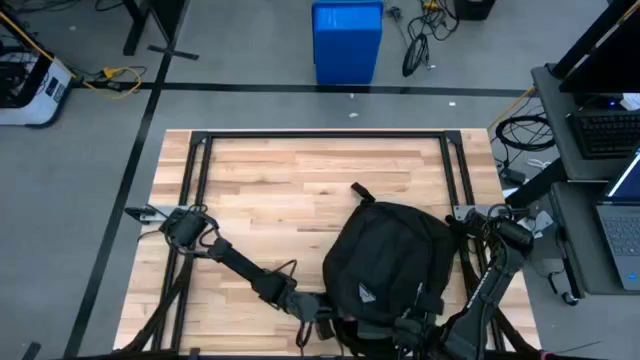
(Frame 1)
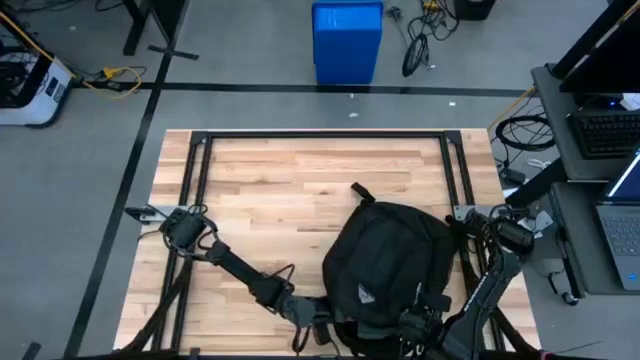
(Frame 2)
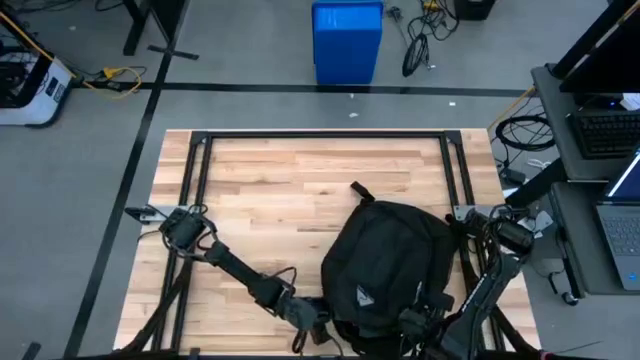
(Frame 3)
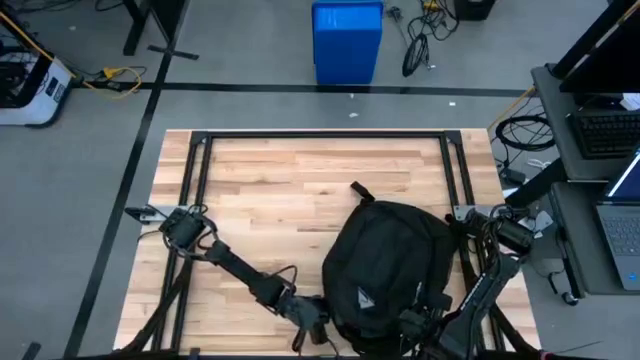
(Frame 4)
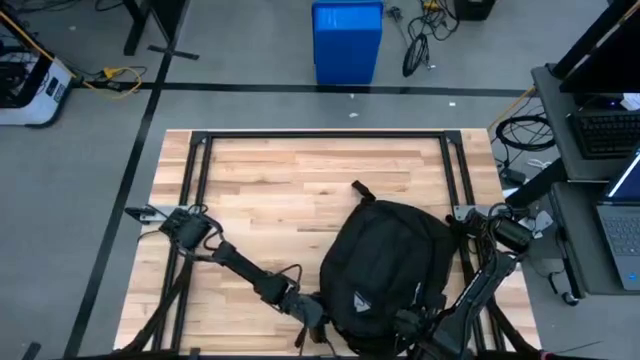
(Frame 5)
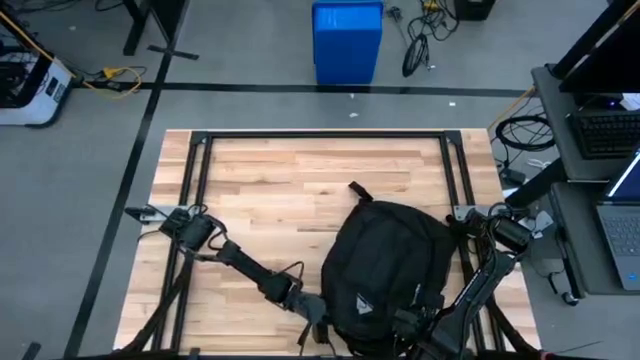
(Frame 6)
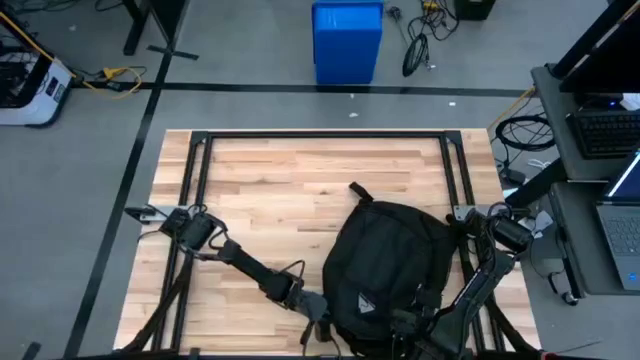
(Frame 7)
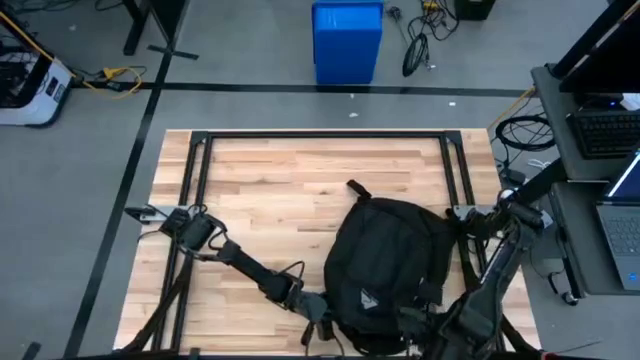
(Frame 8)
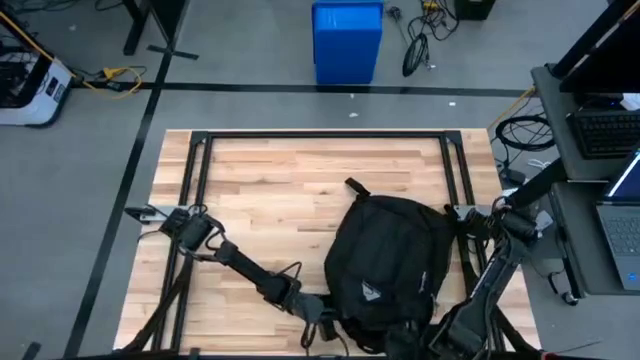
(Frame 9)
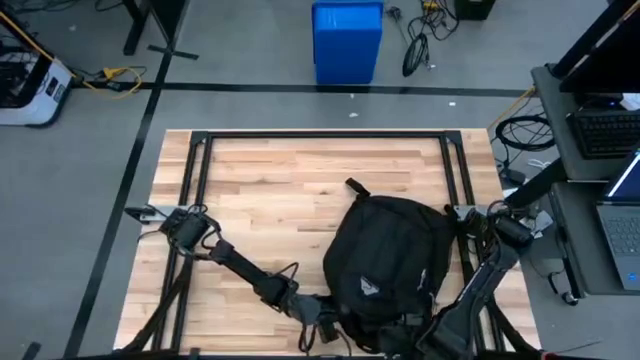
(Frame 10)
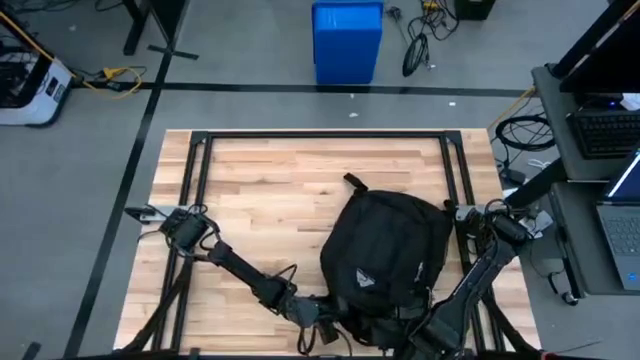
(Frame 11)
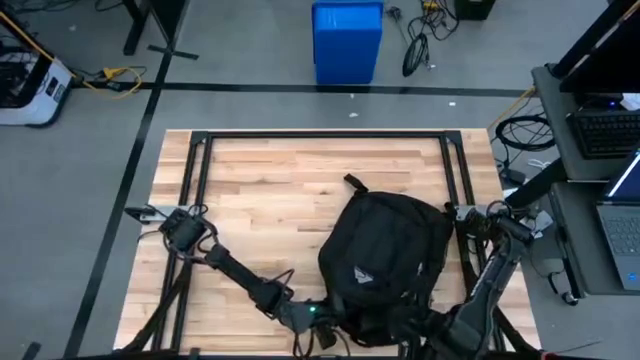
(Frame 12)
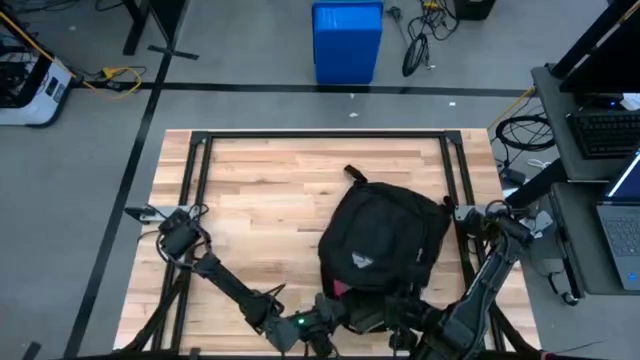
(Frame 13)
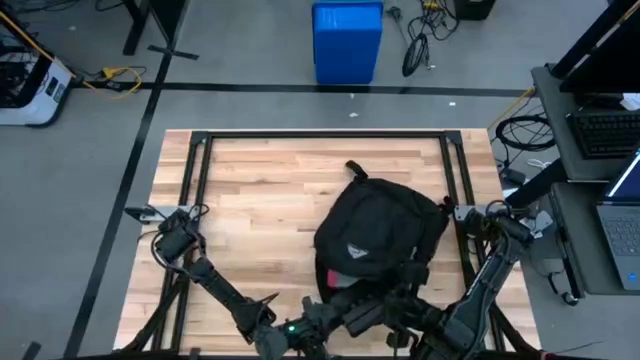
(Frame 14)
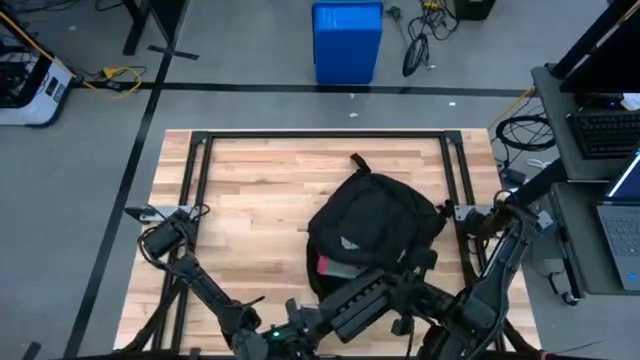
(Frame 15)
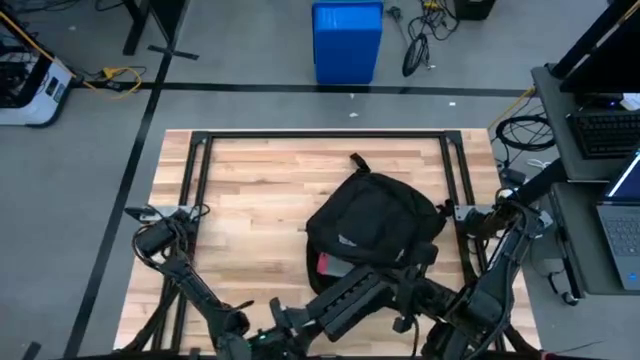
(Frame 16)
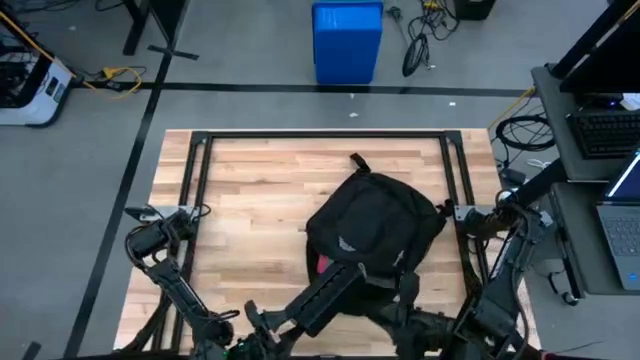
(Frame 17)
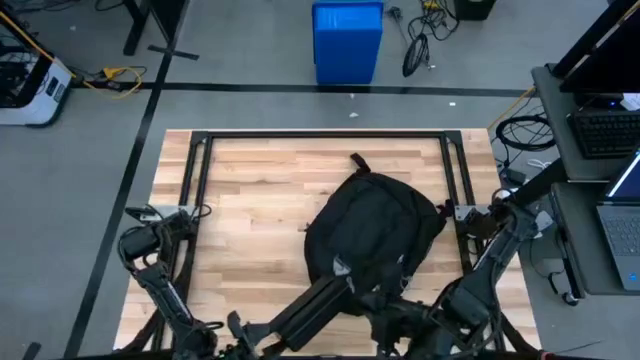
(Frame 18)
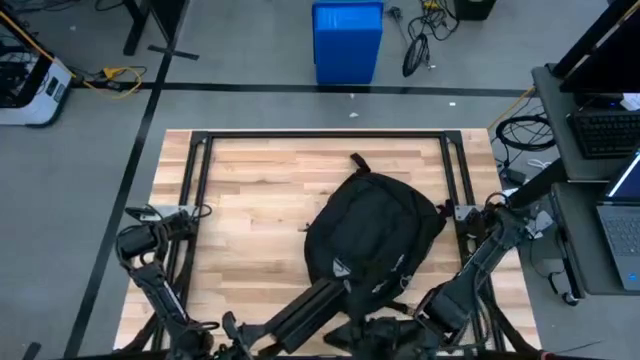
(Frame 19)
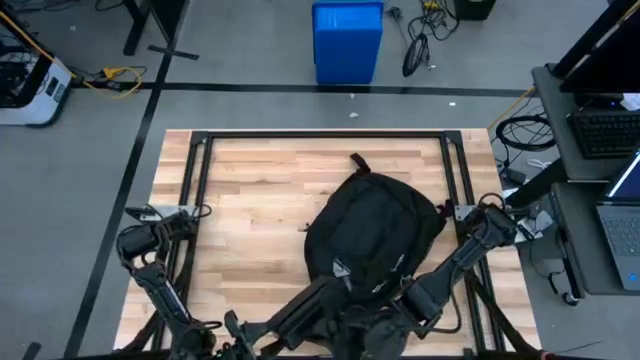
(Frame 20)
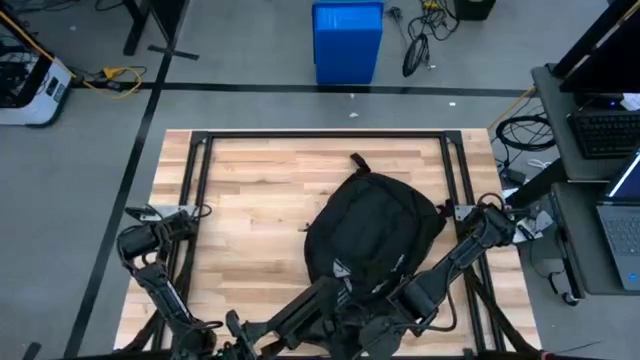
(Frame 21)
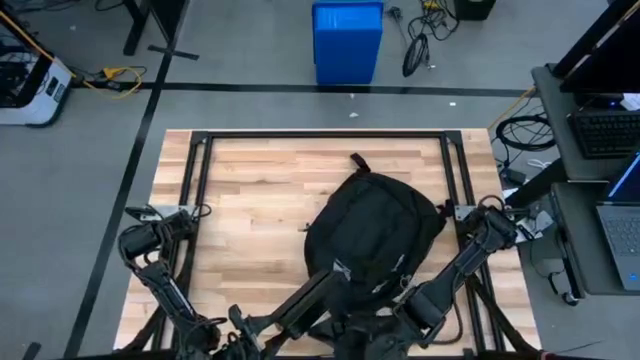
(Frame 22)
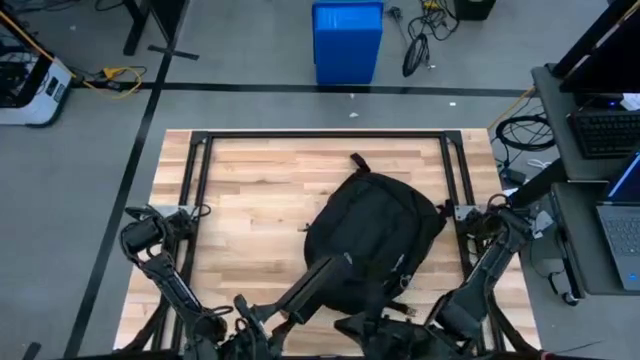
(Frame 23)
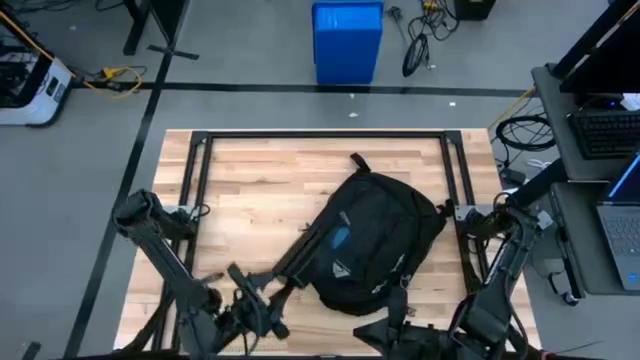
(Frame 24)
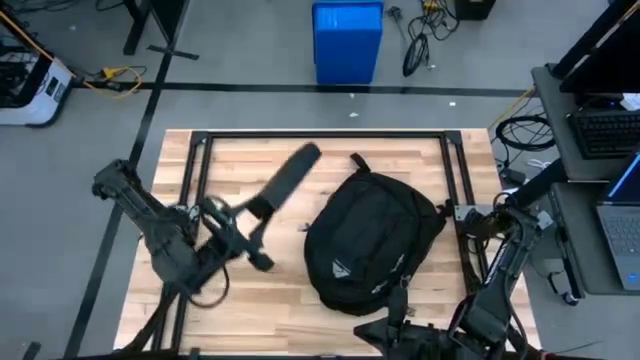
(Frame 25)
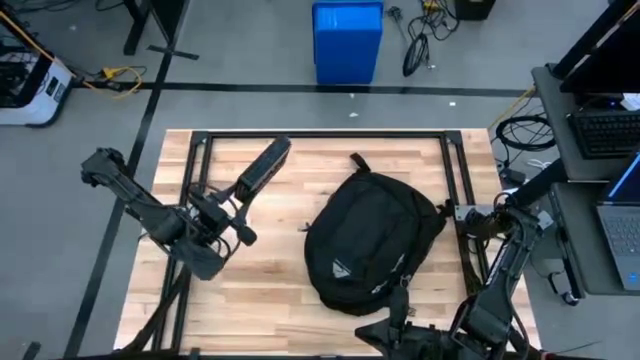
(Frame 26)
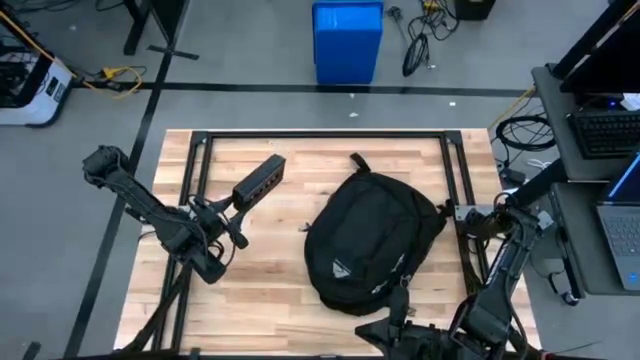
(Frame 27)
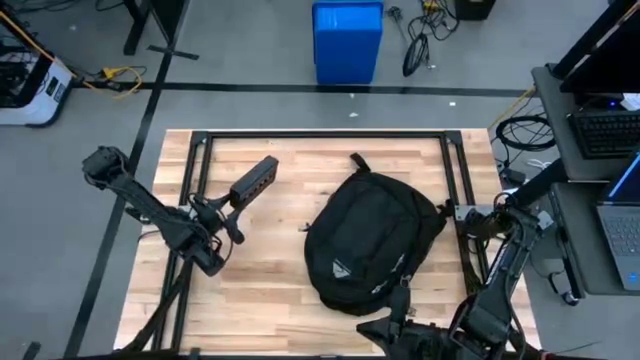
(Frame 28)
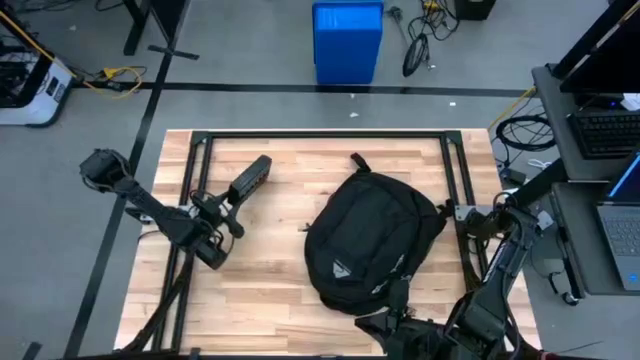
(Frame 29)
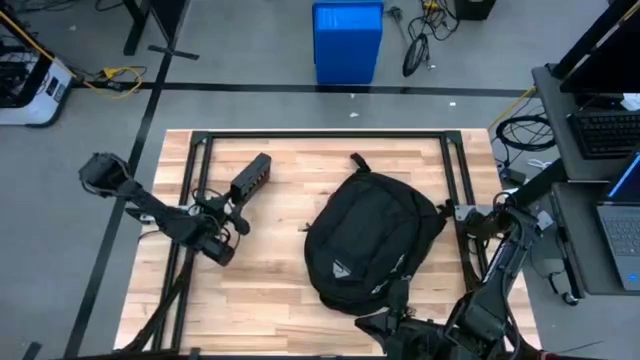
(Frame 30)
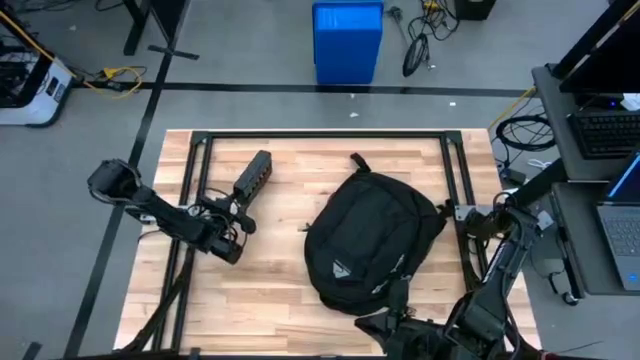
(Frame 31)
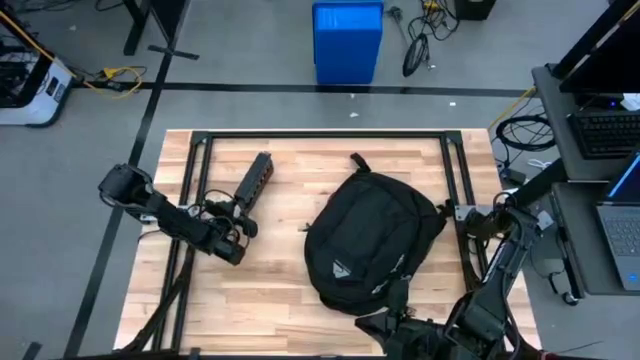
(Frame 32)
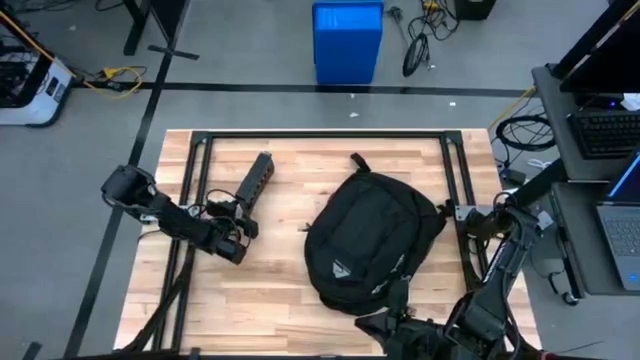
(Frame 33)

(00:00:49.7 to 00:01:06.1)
Task: Unpack backpack
Remove the black medicine organizer from the black backpack

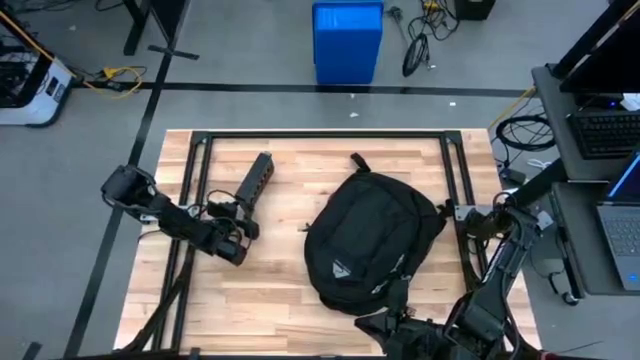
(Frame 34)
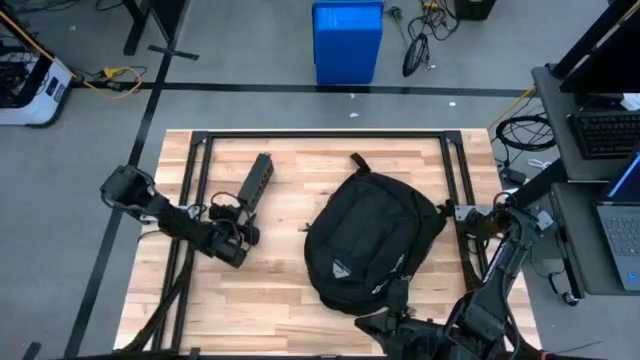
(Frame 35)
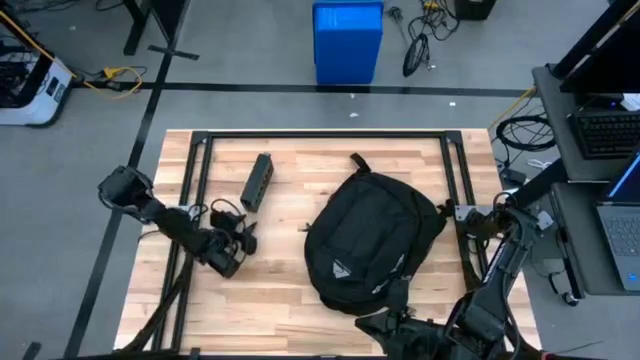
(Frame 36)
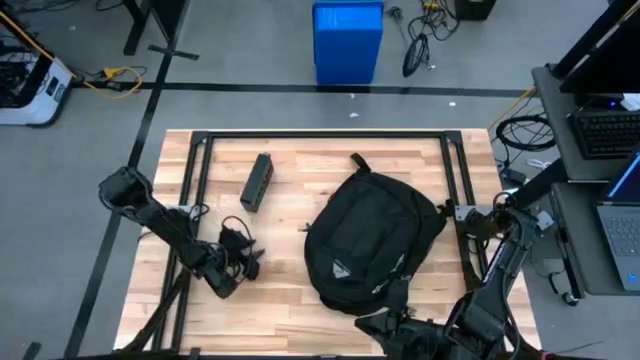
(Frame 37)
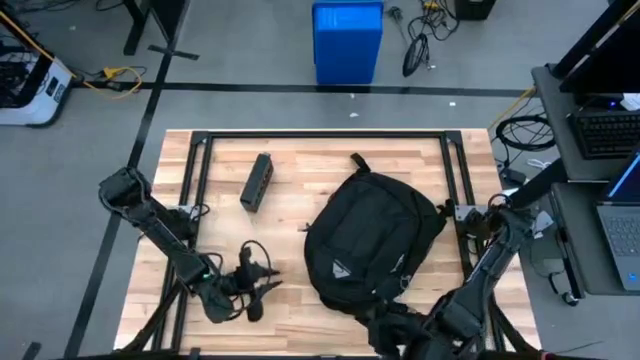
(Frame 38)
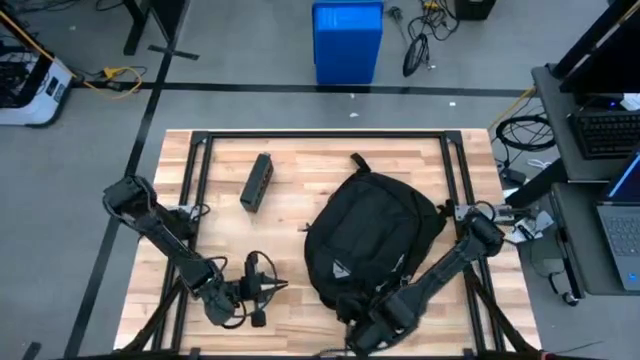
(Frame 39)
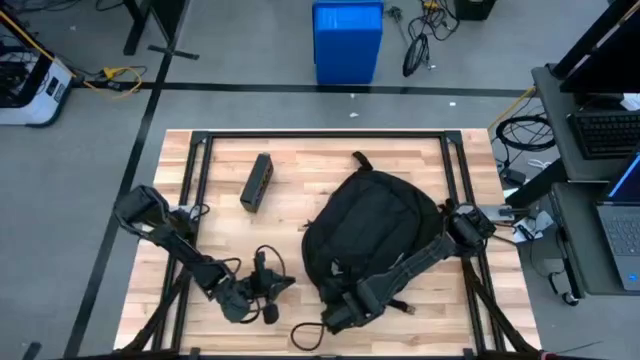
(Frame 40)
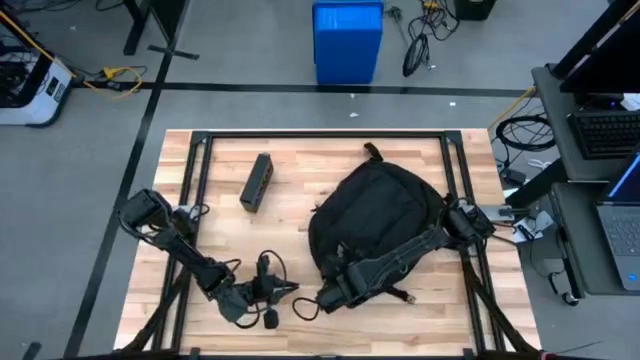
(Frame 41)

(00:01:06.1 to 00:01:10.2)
Remove the black calculator from the black backpack

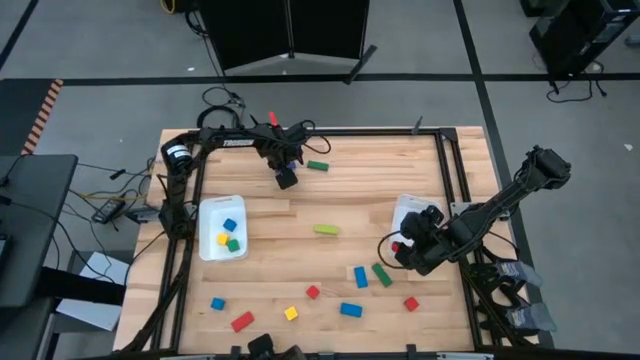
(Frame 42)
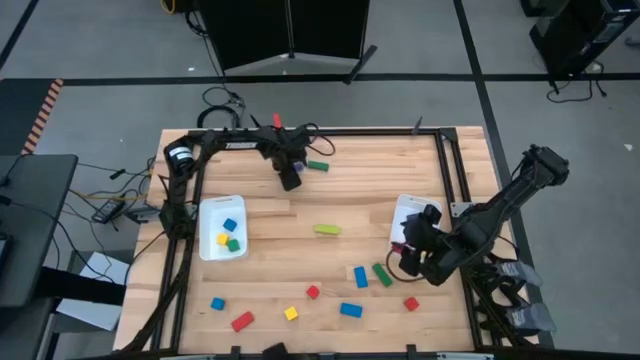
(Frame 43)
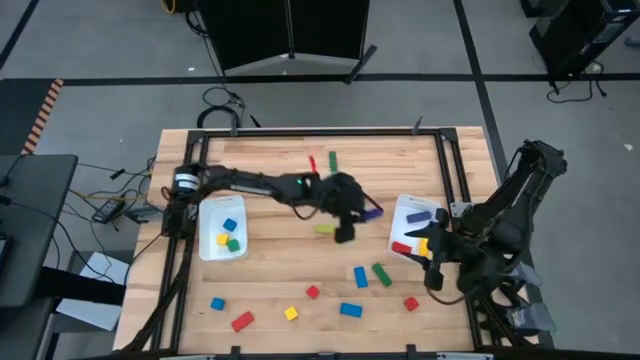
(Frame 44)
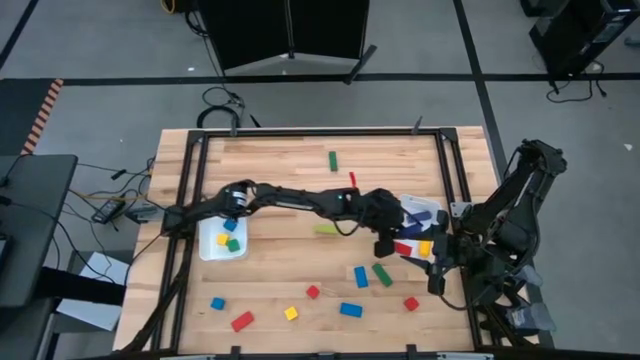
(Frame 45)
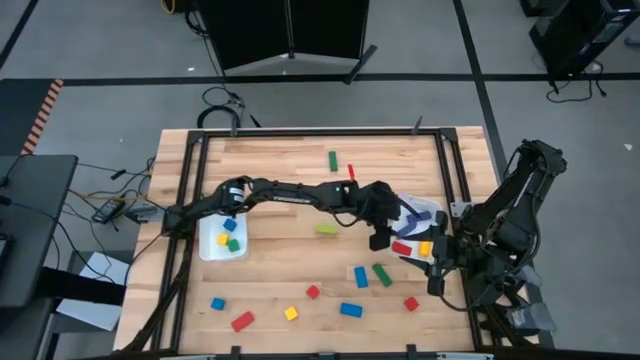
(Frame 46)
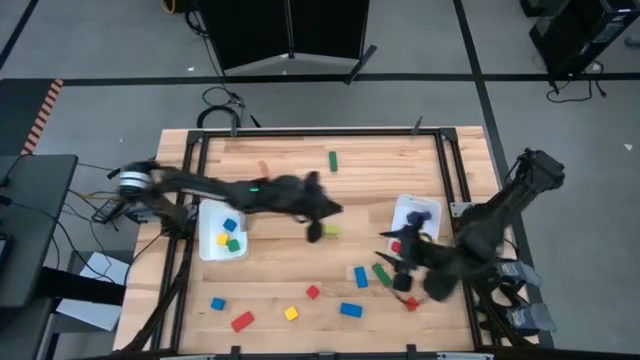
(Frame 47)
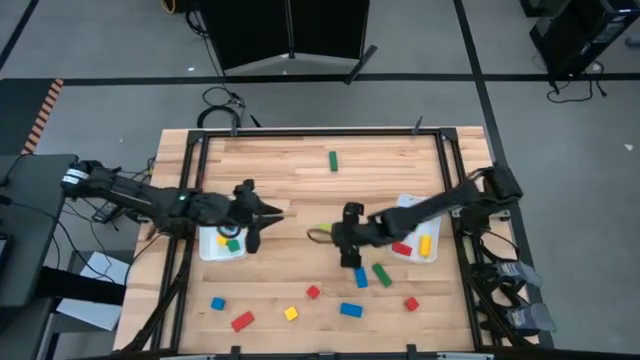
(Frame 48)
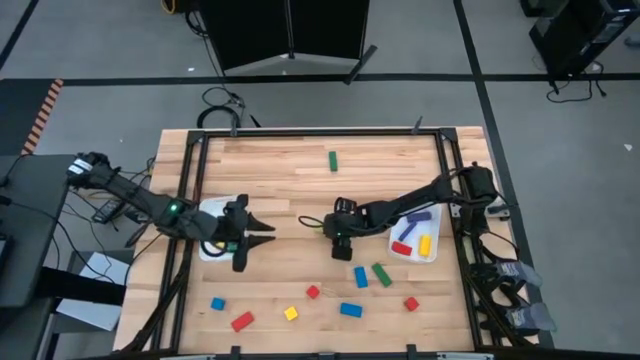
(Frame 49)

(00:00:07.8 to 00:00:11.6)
Task: Sort blocks by size
Put the blue game piece in the right bin
